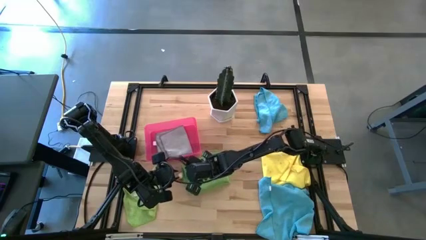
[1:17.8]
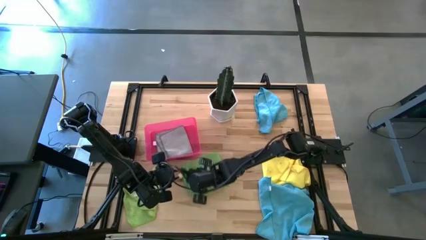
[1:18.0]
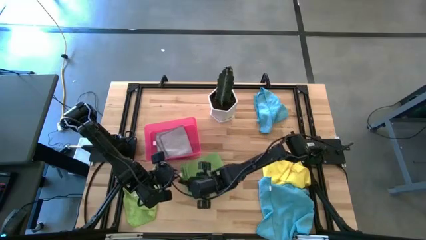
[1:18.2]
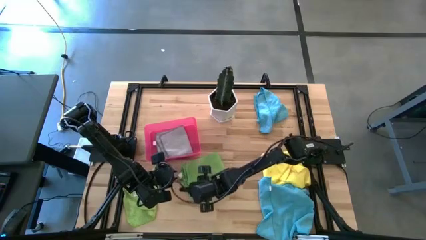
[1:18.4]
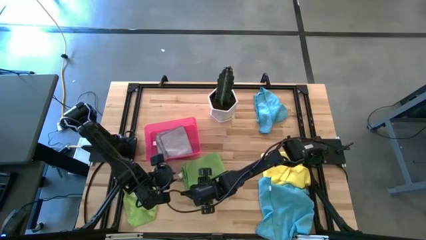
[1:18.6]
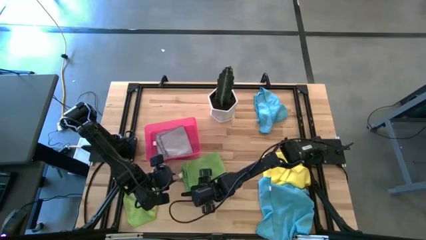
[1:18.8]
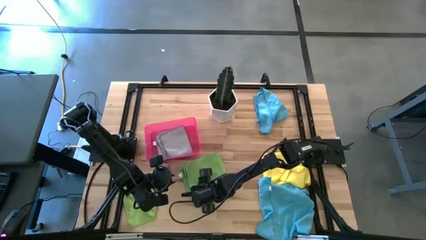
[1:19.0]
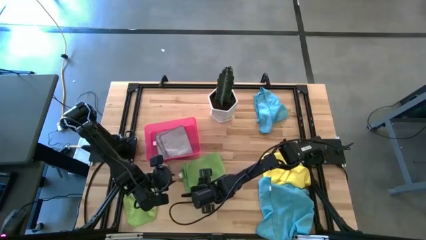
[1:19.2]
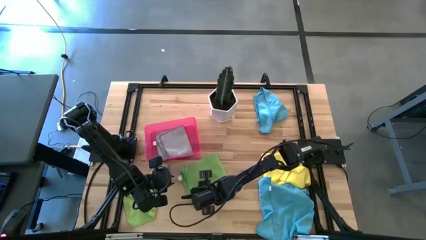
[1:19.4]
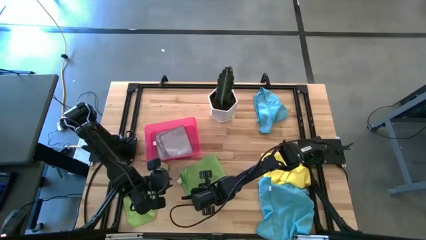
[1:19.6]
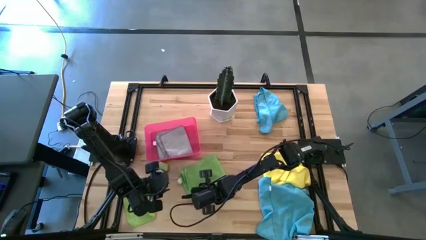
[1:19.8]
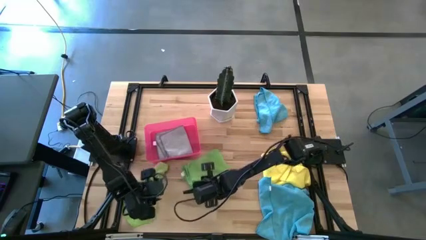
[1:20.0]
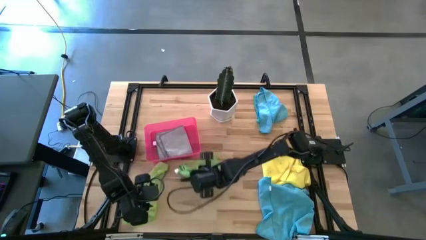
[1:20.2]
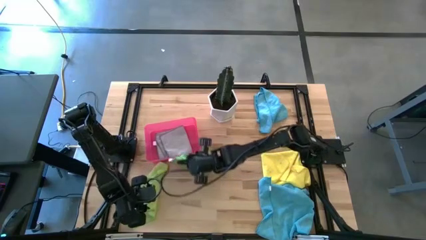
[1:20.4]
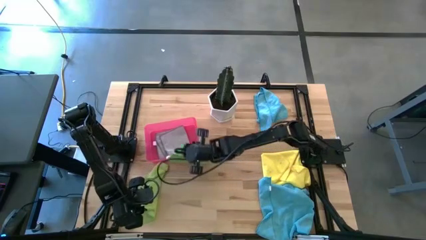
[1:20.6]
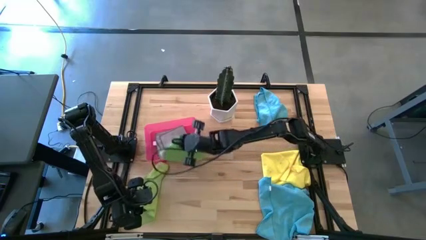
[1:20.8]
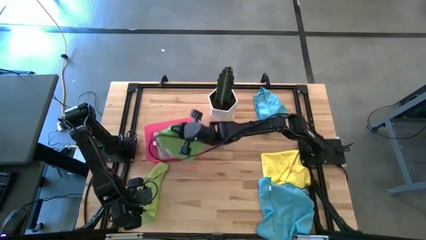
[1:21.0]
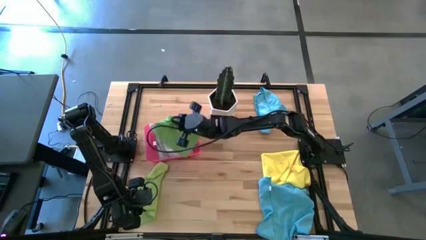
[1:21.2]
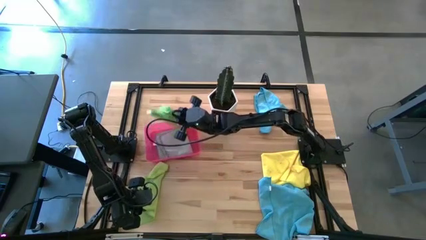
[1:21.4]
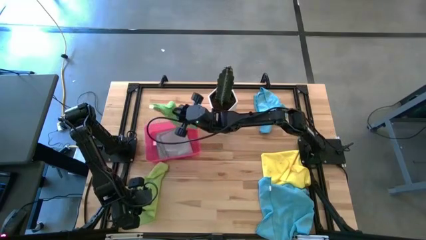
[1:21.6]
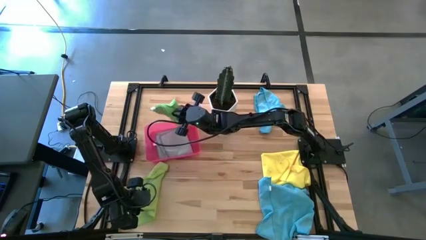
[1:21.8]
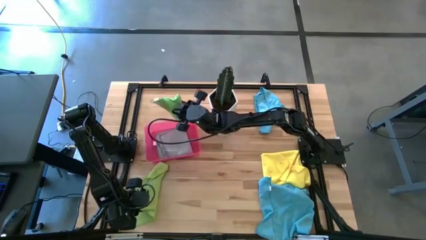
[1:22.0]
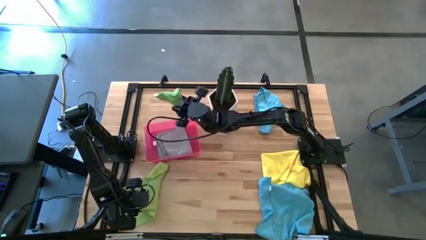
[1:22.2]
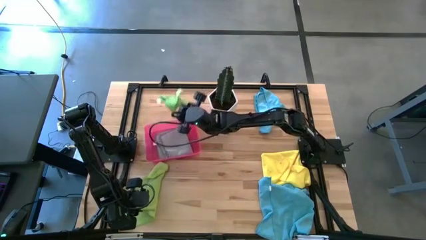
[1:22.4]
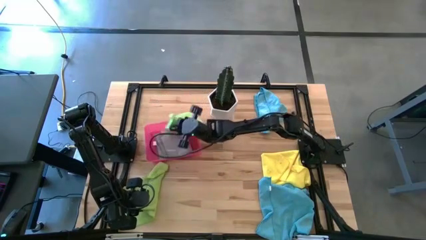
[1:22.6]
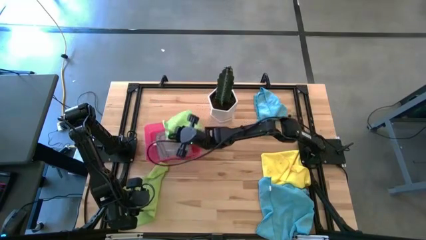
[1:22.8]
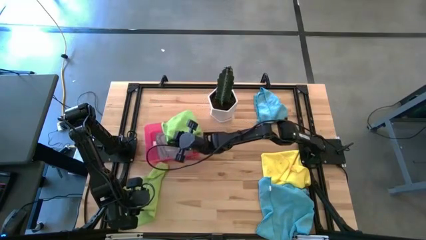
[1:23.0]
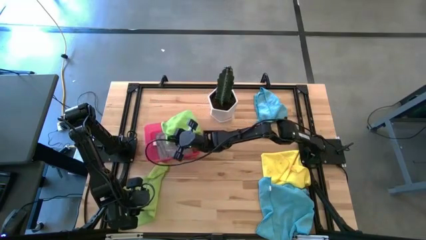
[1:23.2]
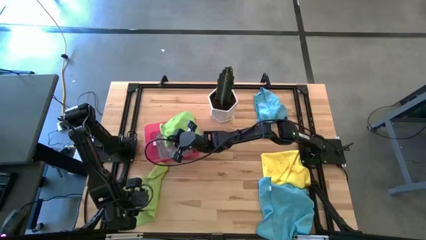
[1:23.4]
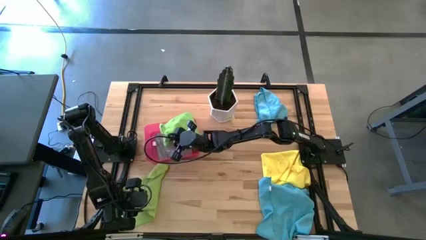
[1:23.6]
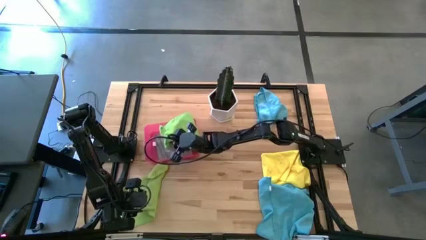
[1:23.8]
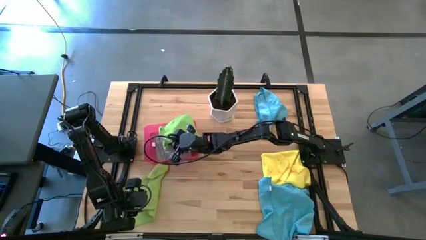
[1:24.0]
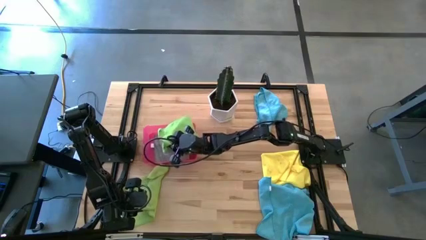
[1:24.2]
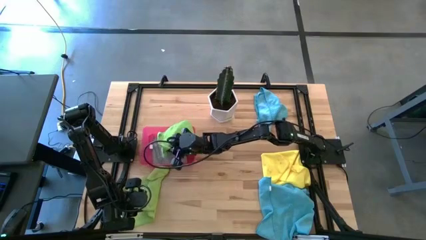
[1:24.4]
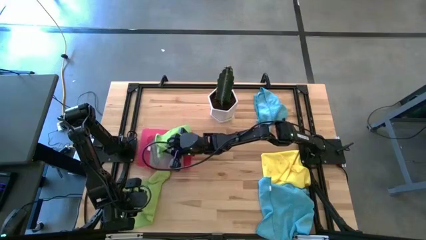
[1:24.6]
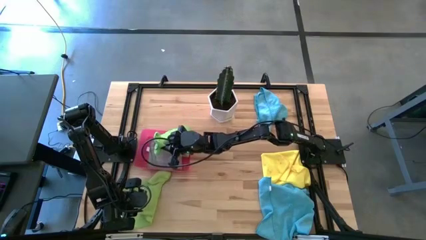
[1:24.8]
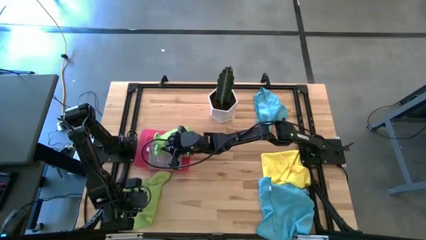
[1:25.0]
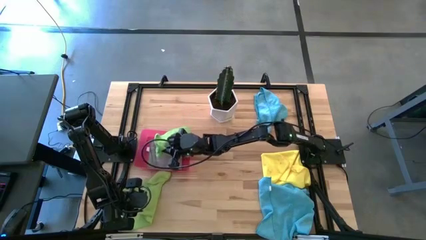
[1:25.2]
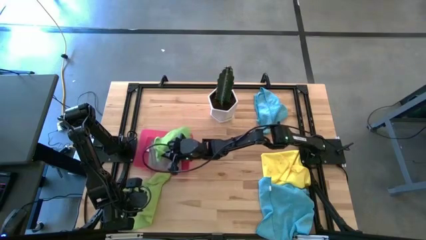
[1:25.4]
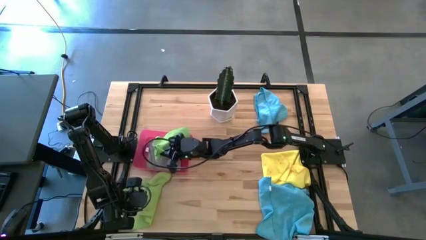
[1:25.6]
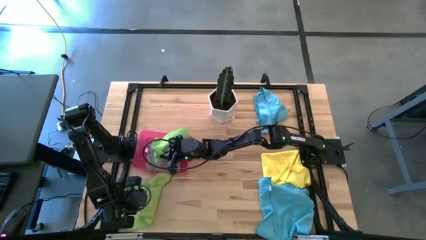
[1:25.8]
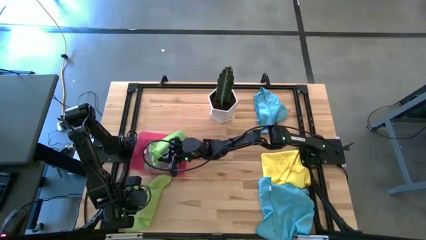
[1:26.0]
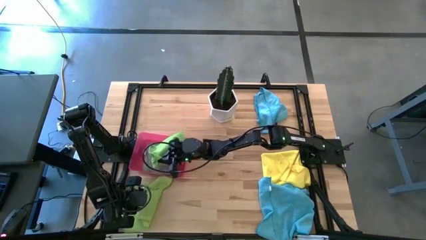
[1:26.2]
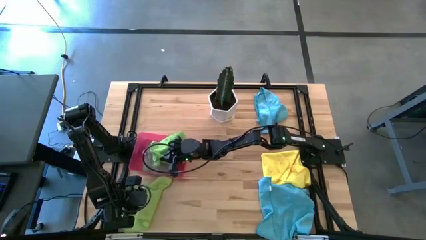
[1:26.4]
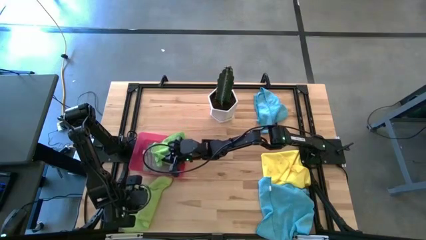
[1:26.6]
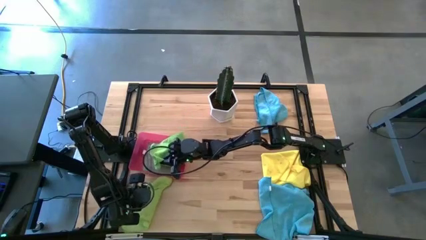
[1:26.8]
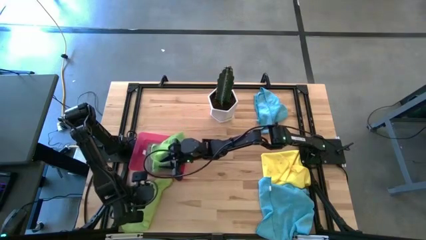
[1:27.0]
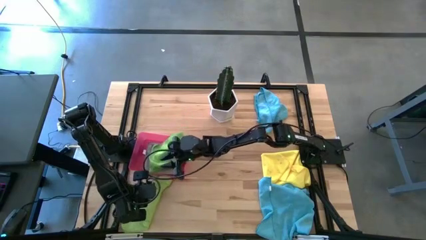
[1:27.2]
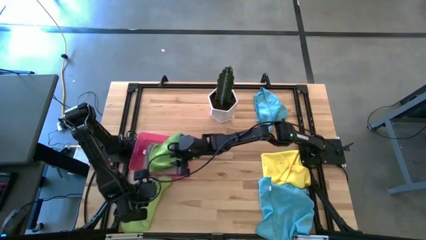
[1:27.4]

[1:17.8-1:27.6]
Task: Fold microfiber towels
Put the folded green microfiber cloth into the transparent pink bin

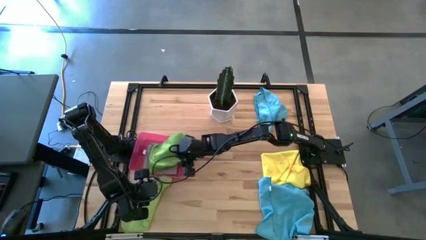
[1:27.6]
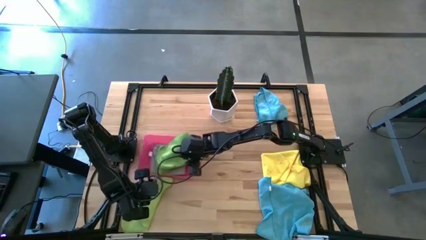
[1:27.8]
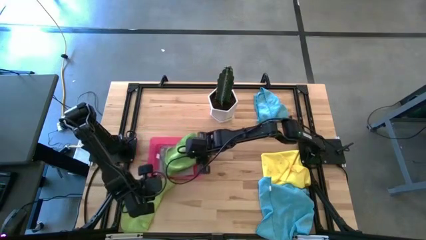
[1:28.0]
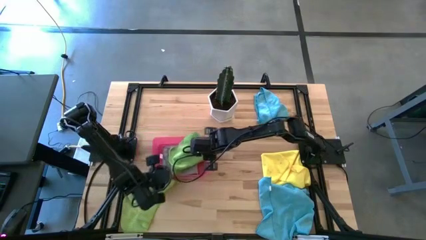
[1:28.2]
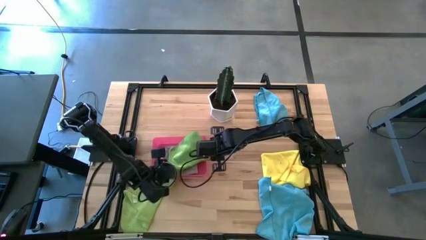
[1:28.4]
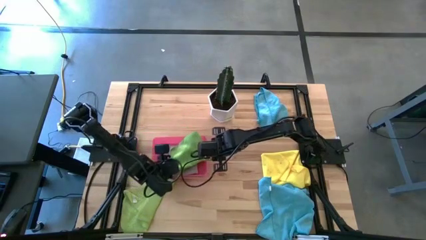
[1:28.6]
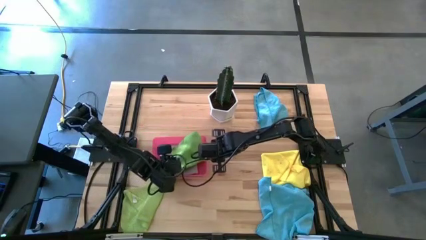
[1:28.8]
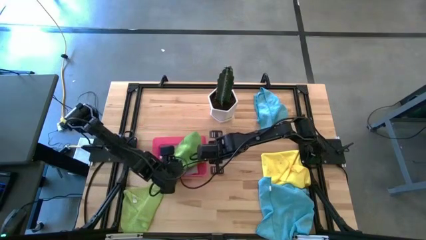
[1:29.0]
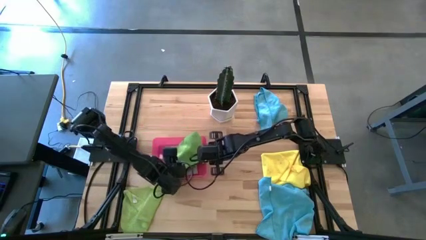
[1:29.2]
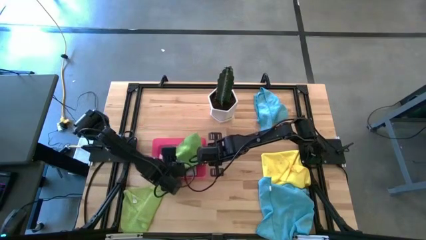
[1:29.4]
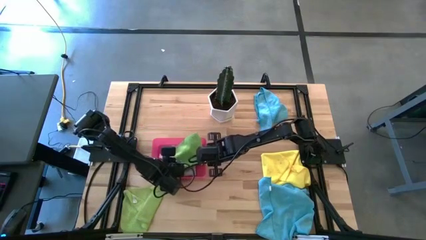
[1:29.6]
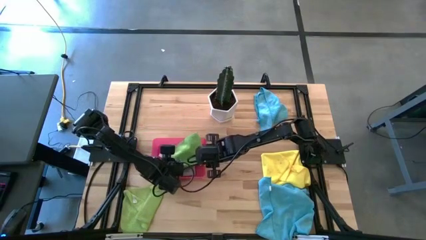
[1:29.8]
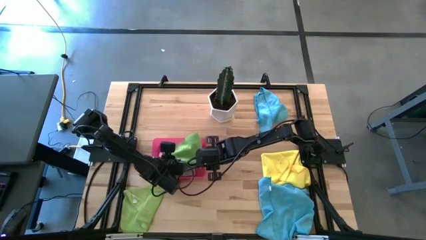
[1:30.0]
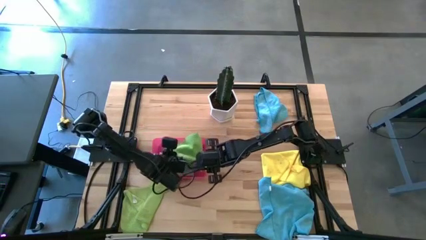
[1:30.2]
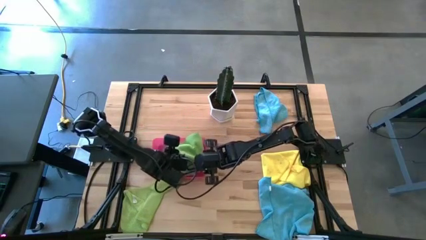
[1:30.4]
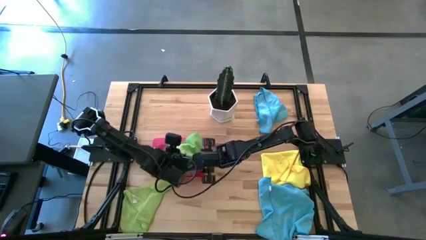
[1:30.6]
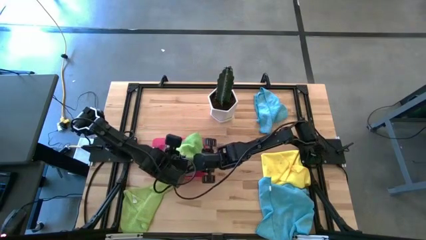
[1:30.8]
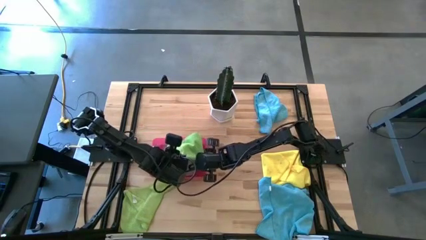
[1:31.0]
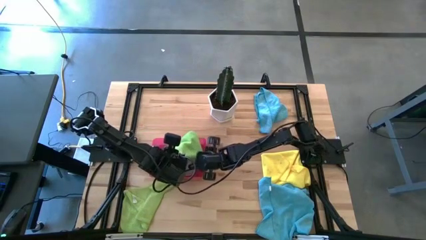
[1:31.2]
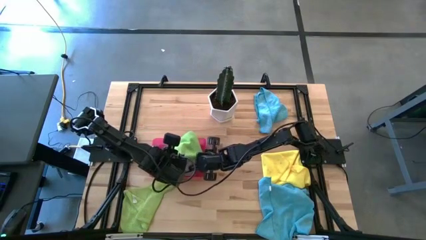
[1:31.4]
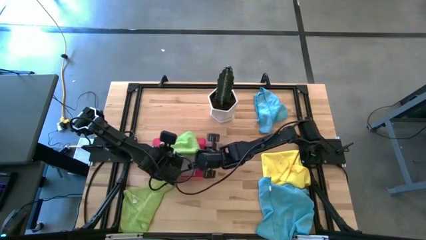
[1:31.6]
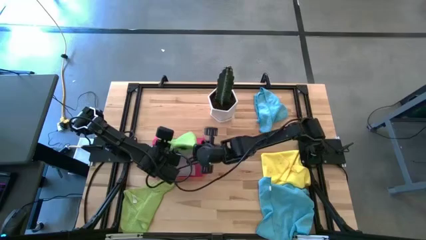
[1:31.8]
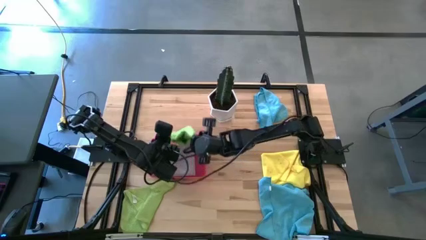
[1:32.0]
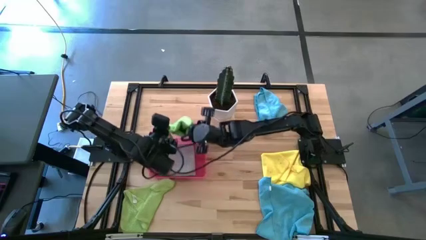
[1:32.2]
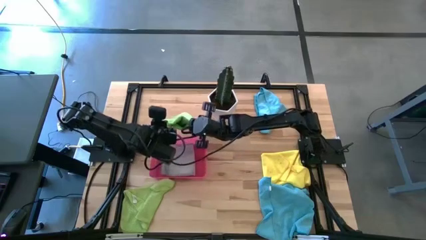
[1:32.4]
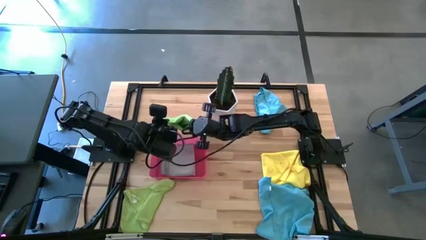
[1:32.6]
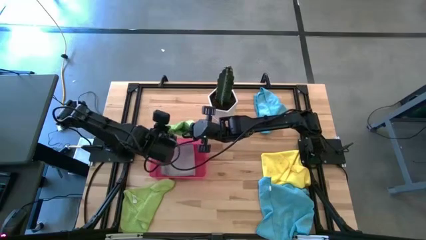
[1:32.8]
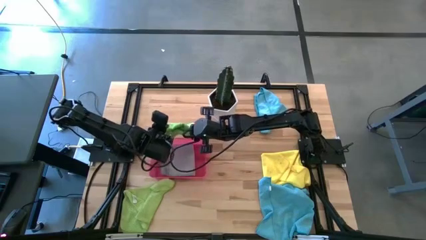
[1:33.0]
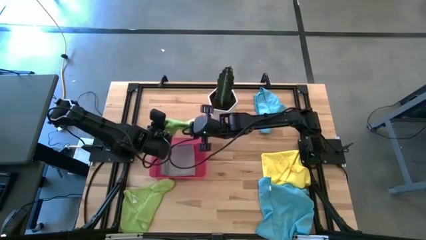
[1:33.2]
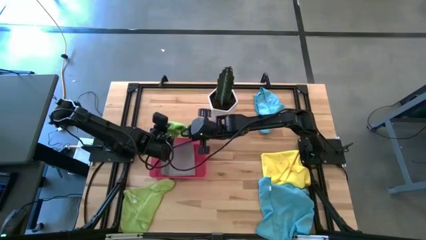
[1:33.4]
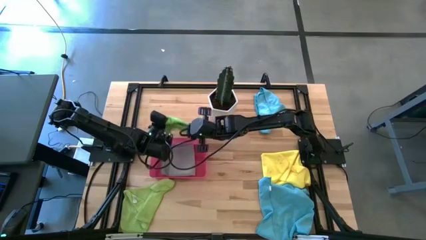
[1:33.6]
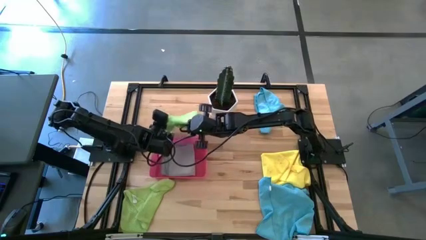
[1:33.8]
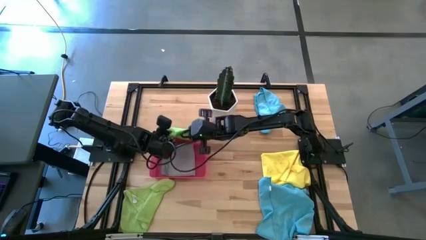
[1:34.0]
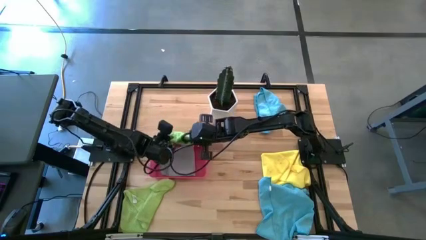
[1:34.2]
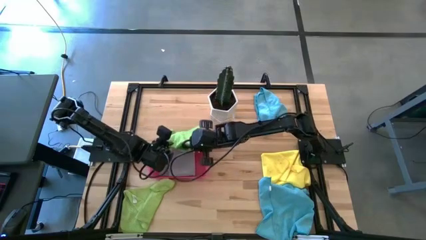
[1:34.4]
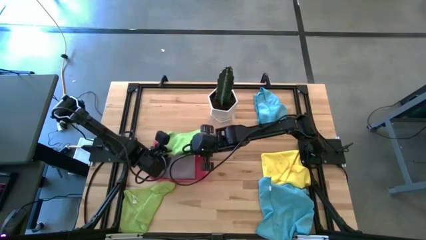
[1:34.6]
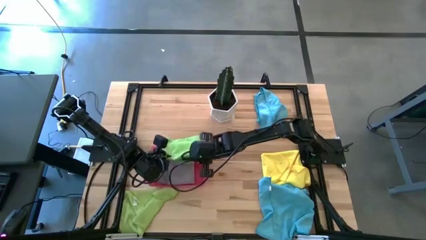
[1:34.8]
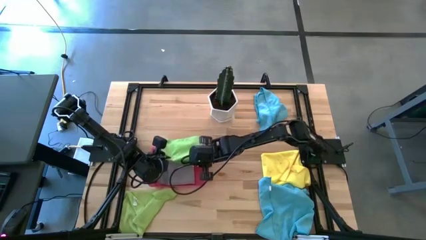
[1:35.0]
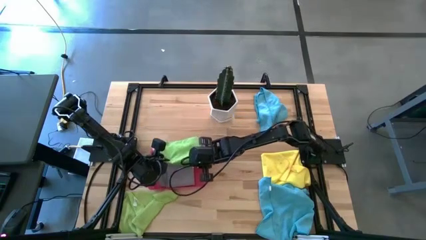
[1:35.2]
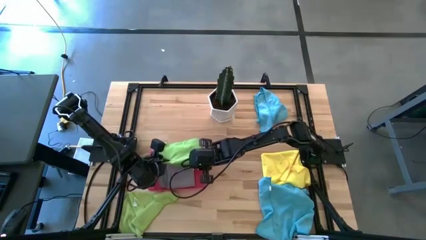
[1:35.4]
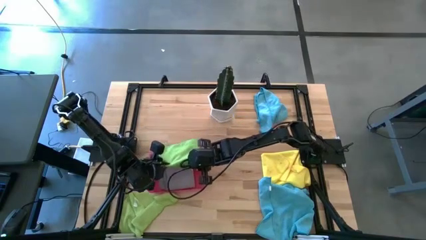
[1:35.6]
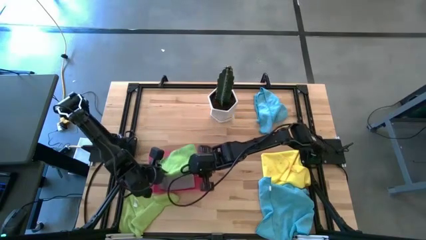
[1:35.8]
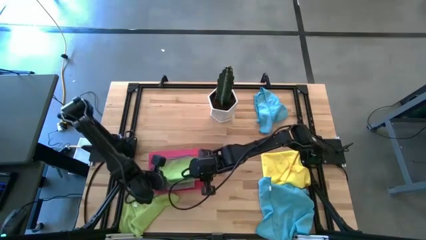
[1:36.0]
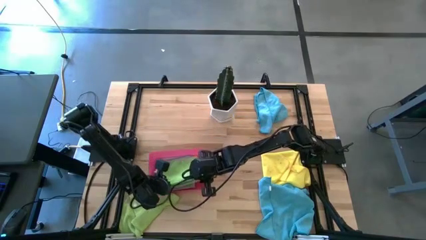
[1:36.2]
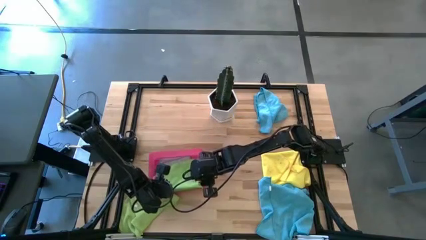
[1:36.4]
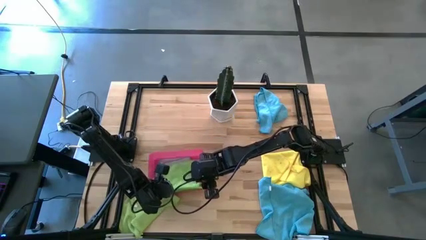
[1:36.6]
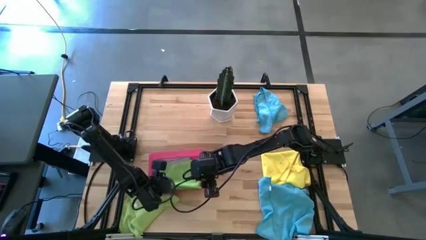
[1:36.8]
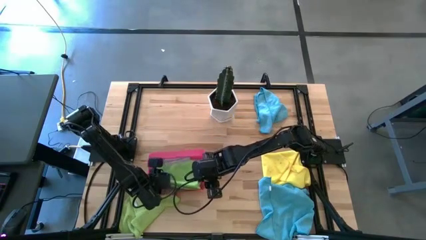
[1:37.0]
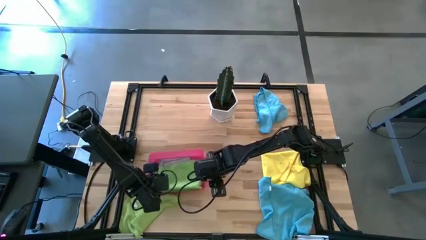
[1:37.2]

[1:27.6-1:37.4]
Put the folded green microfiber cloth into the transparent pink bin
